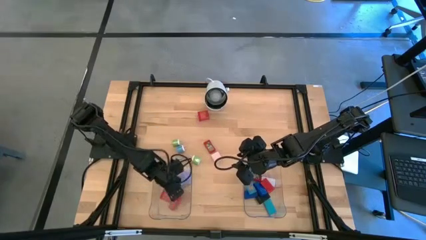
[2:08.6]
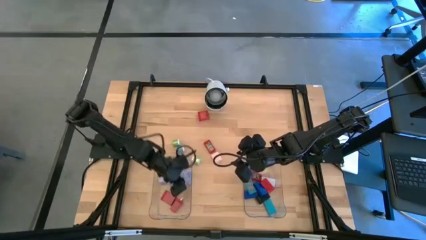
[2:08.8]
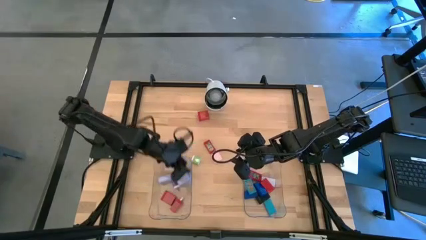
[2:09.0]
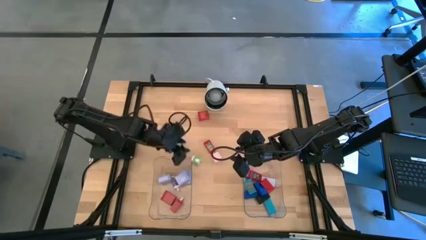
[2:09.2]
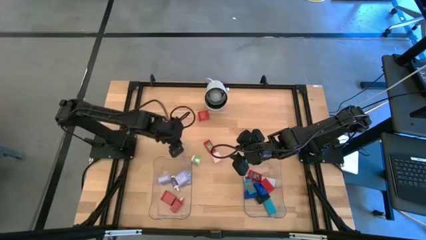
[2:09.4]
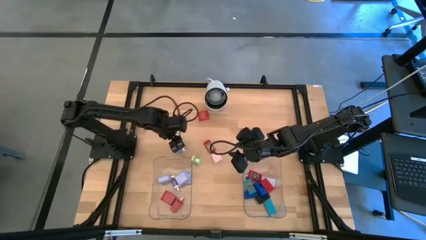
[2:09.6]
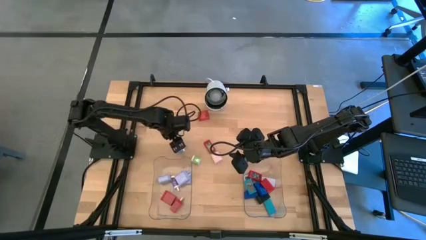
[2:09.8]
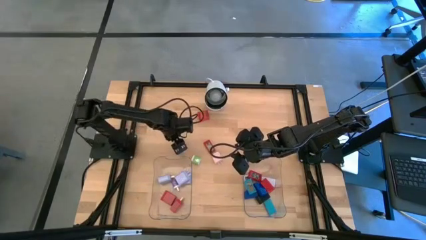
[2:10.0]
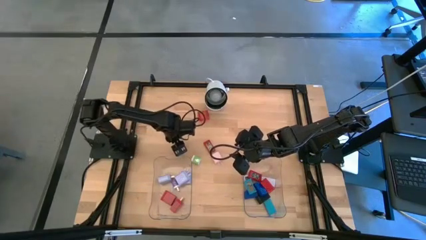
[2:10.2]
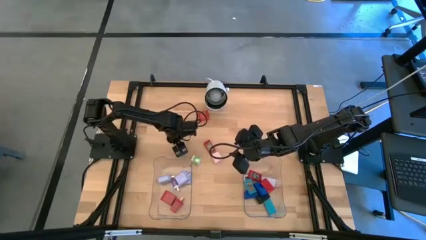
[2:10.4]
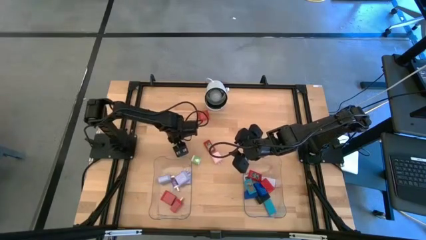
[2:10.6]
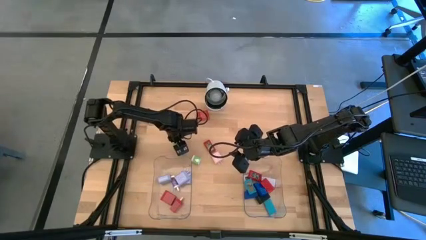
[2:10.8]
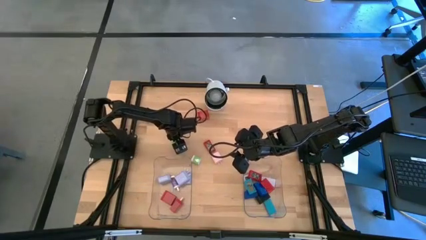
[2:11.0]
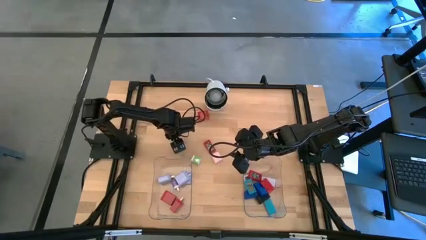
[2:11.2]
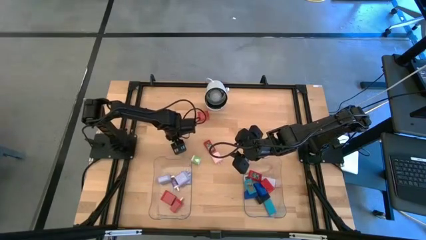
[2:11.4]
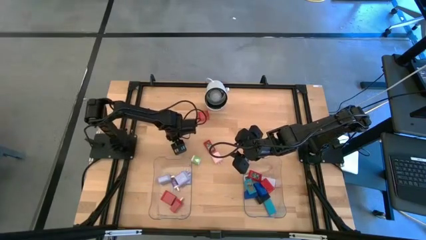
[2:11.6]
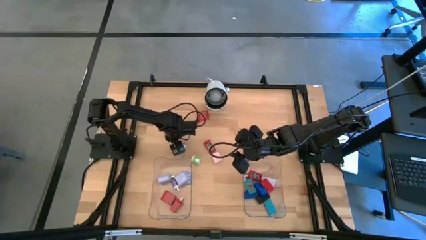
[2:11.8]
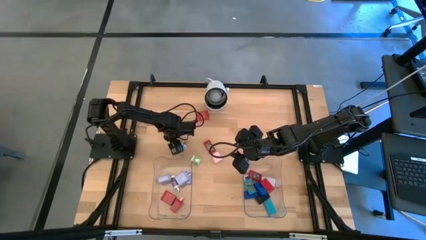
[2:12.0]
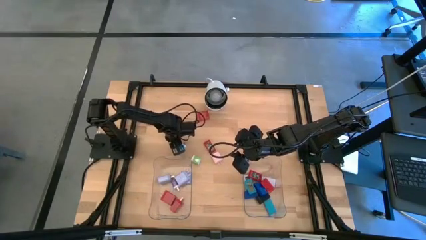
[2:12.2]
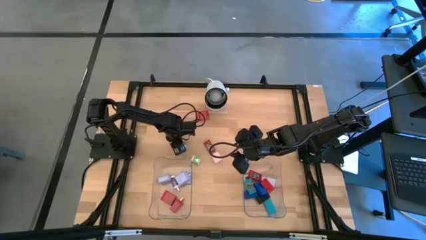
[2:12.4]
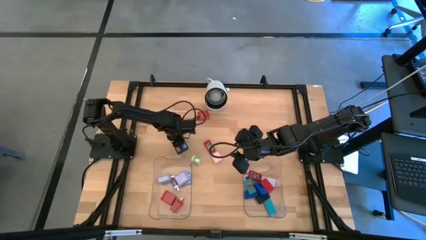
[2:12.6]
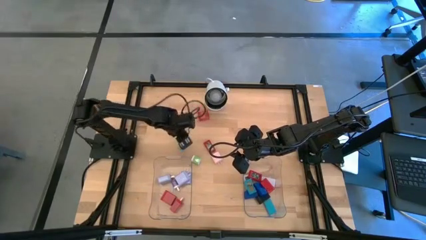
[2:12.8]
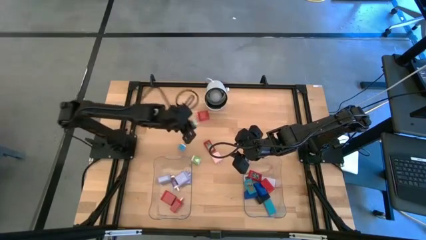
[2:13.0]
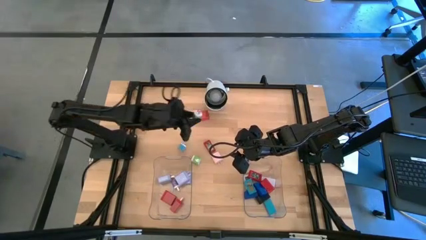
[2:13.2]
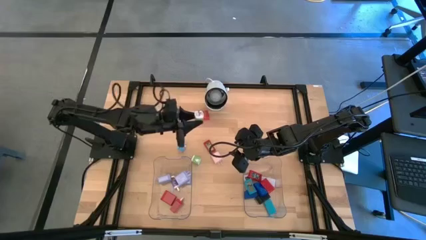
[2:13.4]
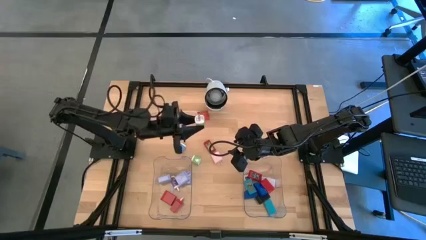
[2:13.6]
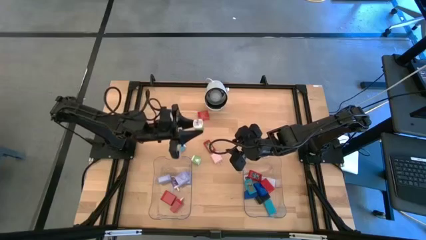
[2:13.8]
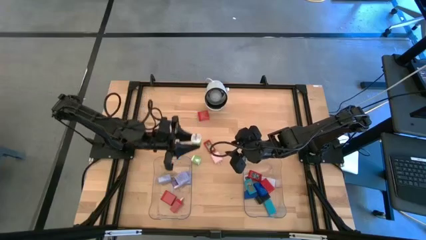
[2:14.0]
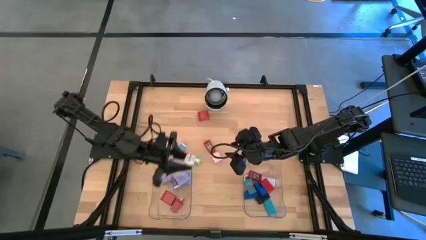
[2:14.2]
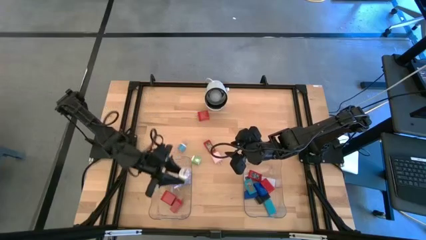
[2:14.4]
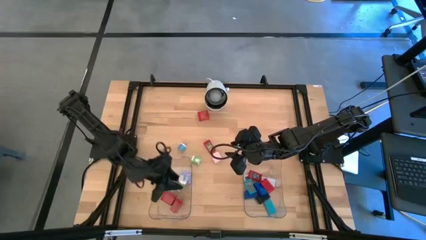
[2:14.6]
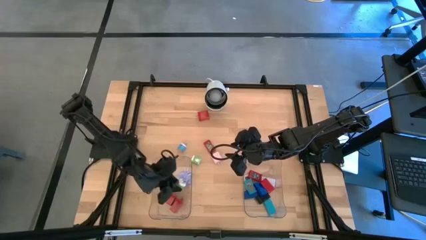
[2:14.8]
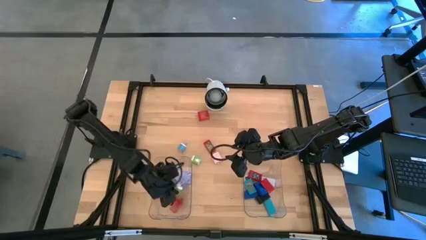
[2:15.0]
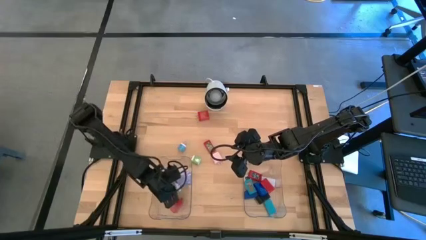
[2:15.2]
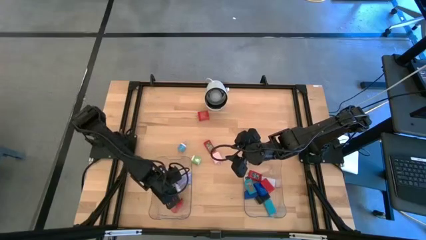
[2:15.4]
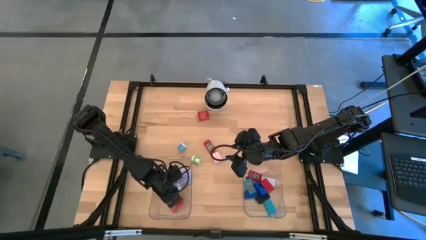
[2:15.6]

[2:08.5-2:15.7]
Task: Pick & Place Office items
Put the top green charger adapter into the left transparent bin

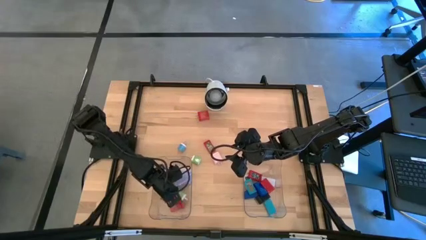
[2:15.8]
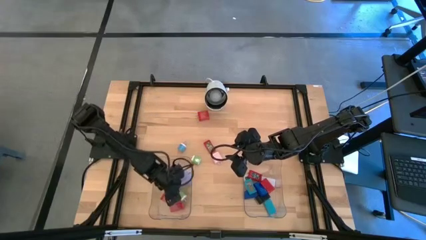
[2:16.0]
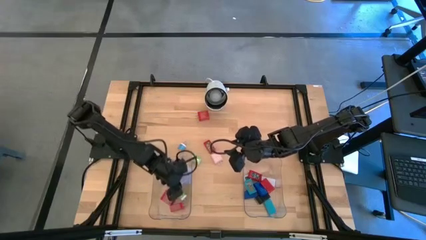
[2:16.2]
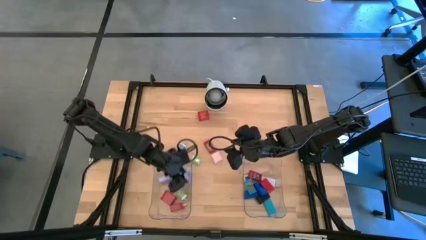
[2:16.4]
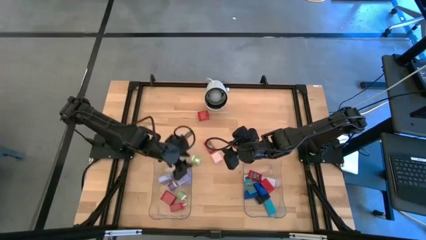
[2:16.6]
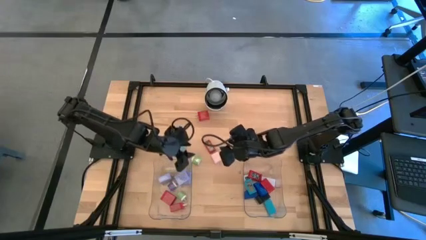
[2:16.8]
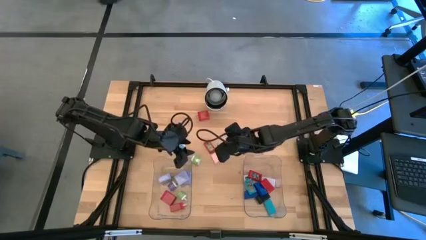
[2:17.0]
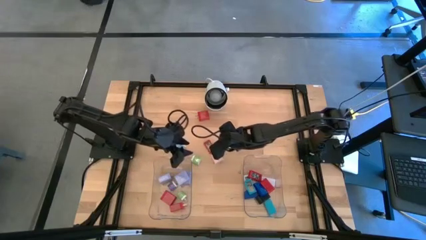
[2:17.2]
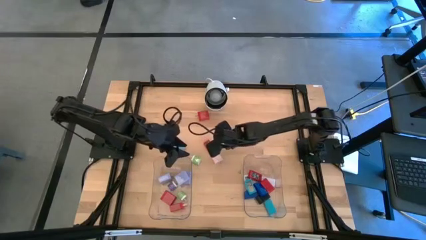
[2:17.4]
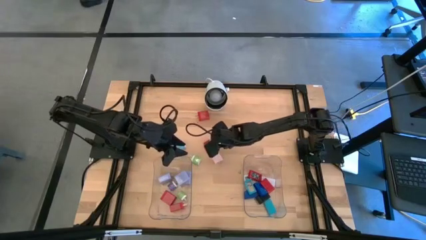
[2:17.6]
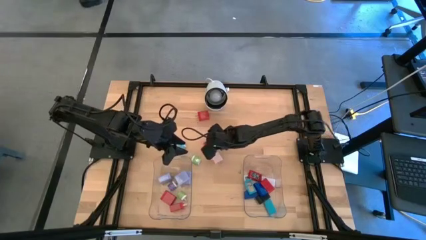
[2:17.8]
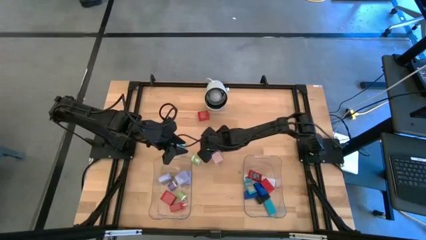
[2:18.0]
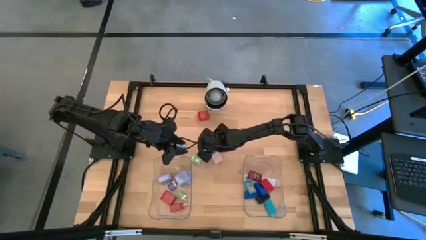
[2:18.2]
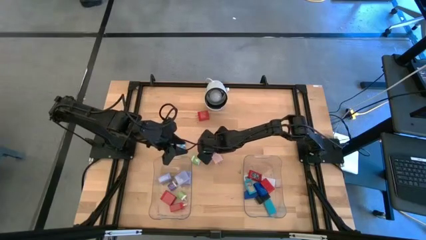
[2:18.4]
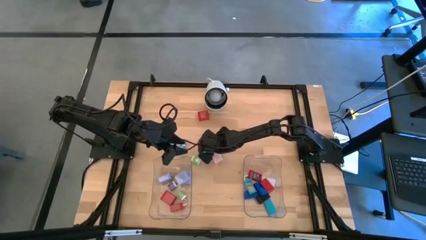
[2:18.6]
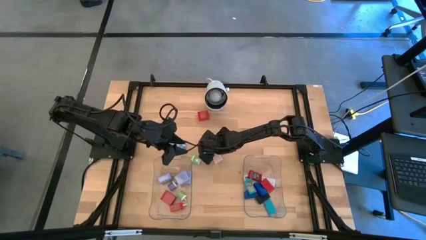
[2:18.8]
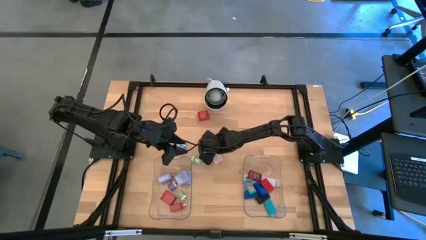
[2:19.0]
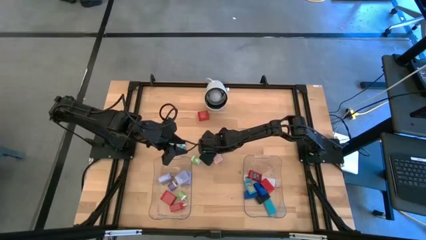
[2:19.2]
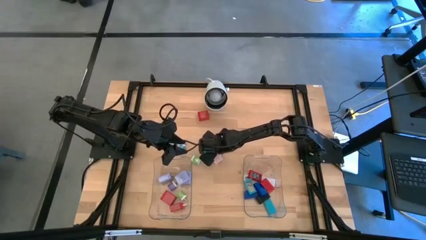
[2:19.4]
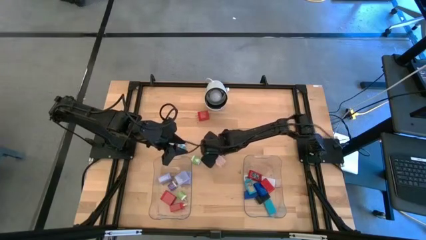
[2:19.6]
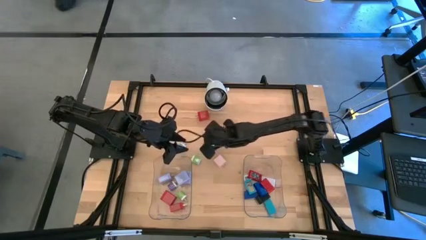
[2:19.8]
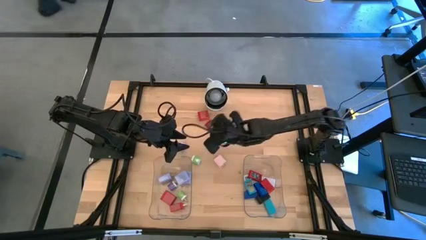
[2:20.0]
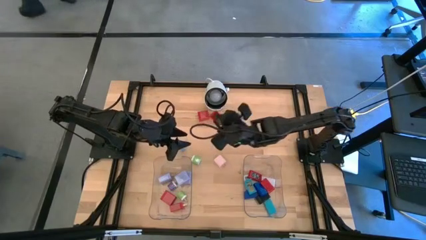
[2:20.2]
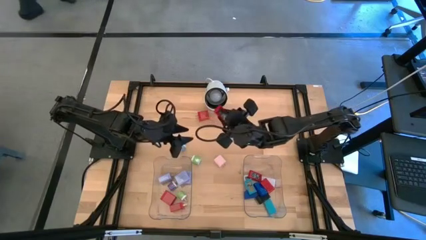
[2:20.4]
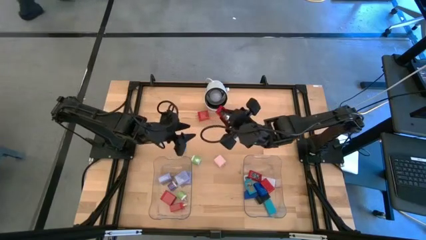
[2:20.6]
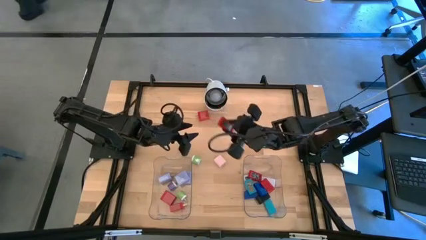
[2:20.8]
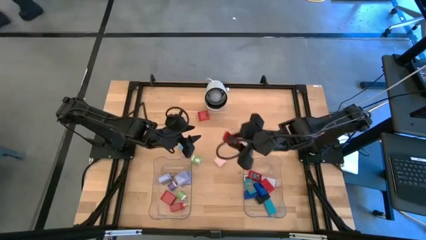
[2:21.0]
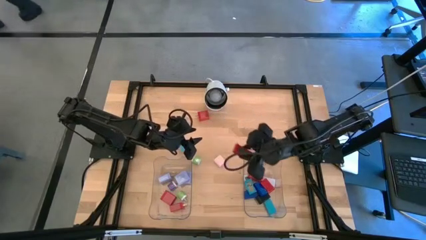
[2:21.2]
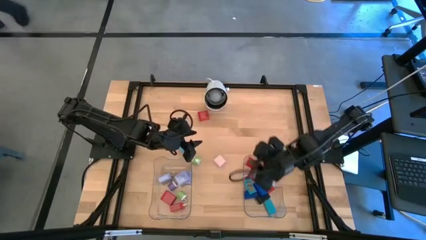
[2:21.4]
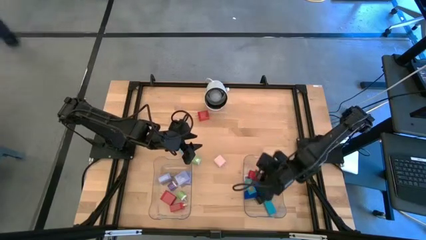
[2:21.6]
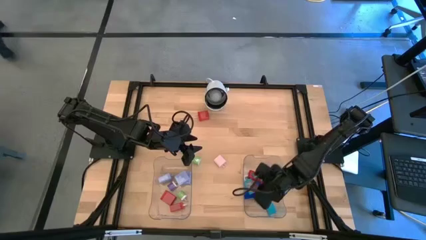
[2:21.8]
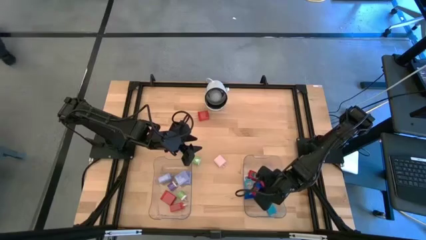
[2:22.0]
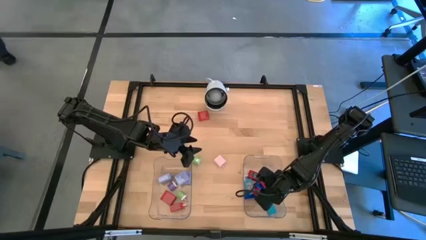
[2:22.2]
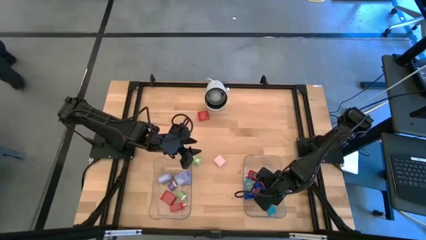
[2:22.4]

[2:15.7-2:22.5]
Put the red timer into the right transparent bin
